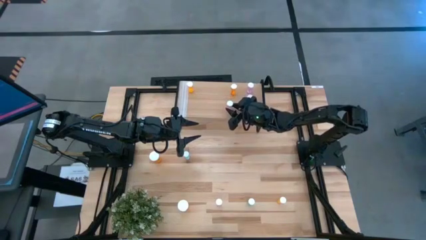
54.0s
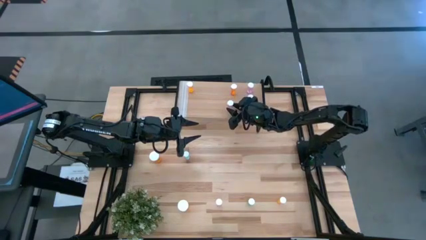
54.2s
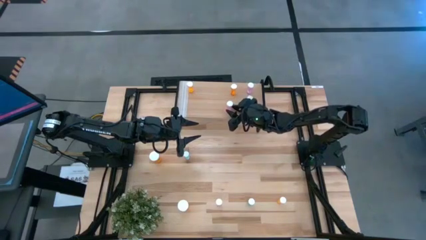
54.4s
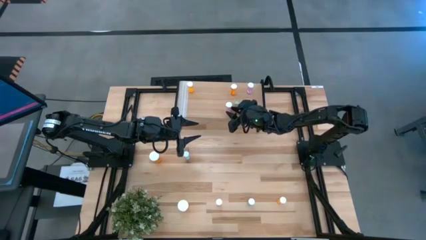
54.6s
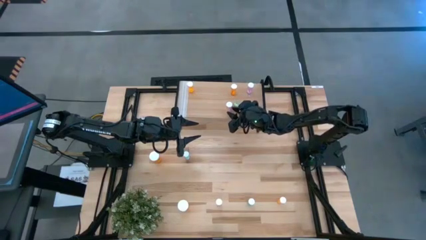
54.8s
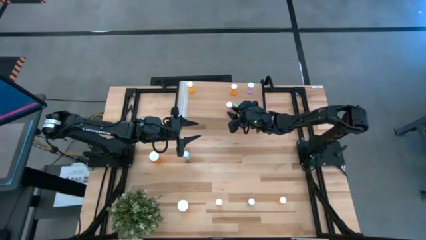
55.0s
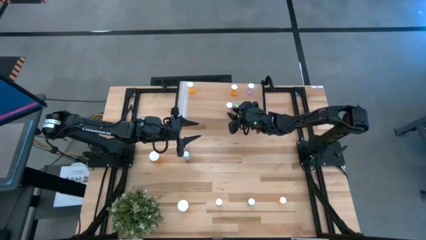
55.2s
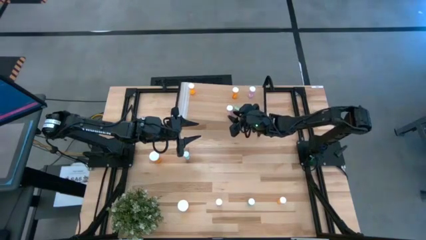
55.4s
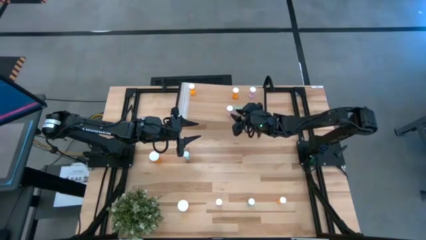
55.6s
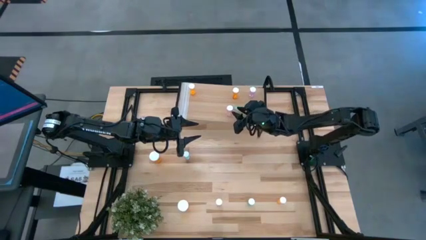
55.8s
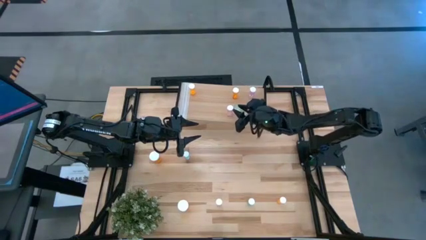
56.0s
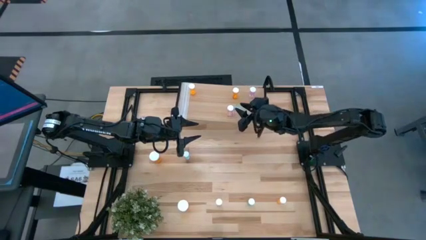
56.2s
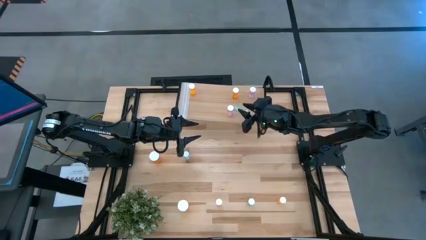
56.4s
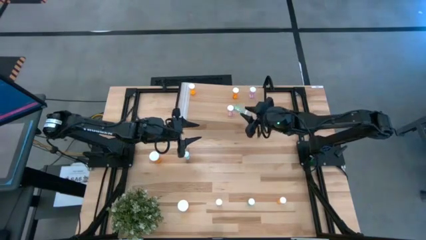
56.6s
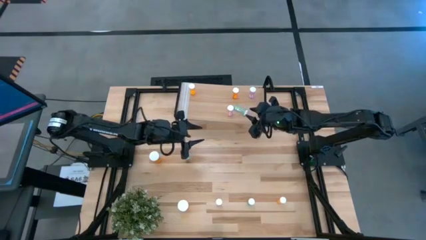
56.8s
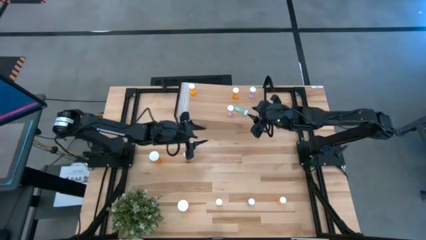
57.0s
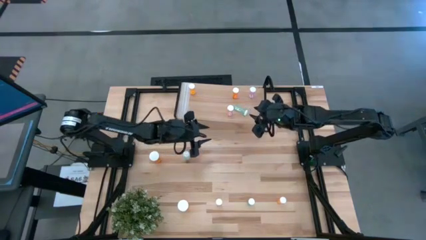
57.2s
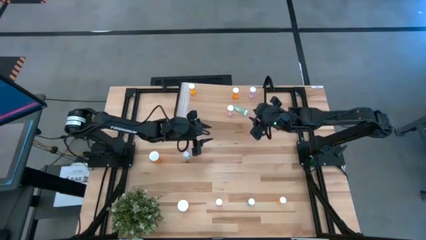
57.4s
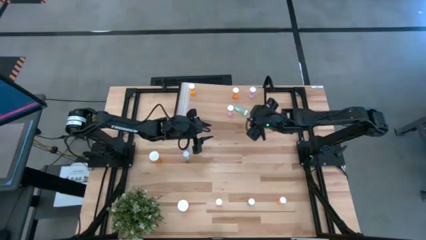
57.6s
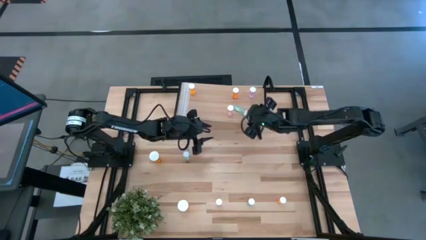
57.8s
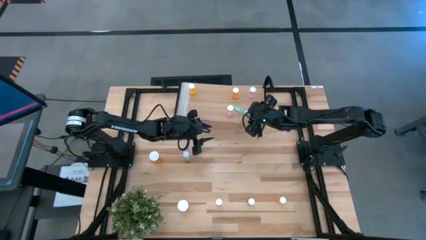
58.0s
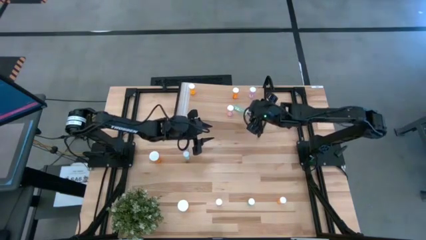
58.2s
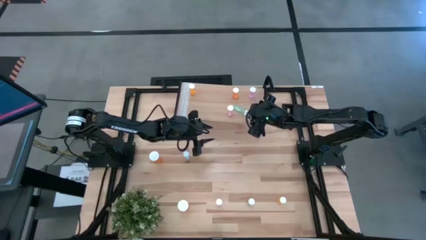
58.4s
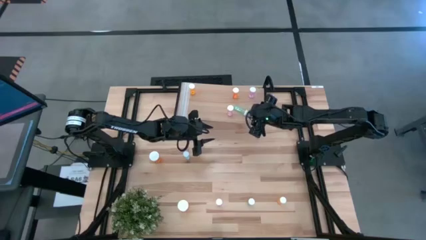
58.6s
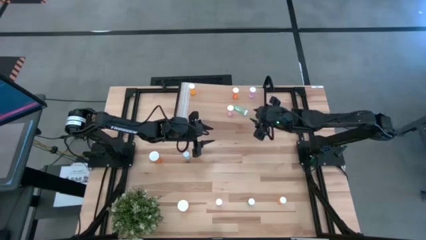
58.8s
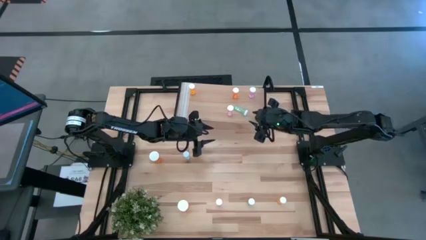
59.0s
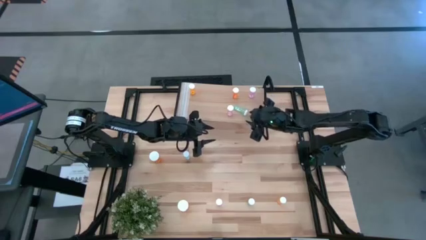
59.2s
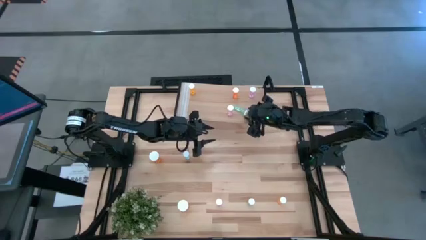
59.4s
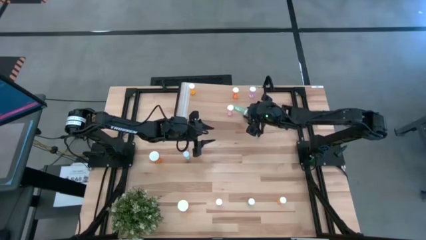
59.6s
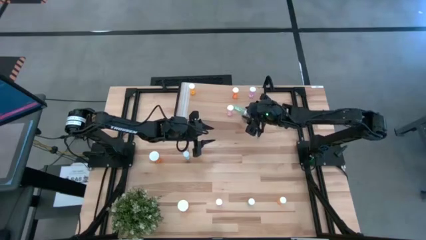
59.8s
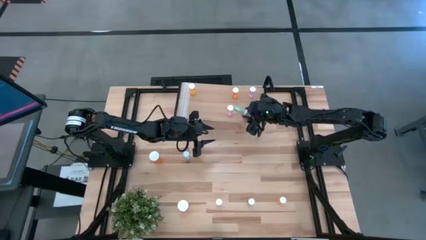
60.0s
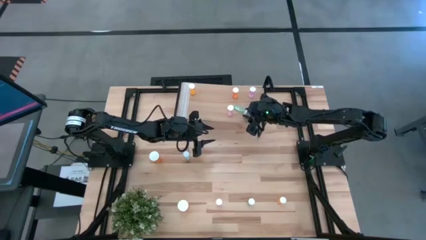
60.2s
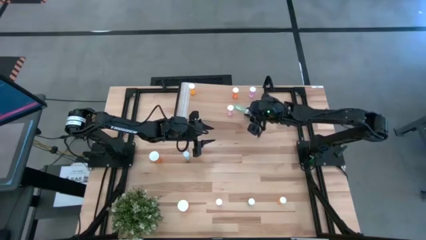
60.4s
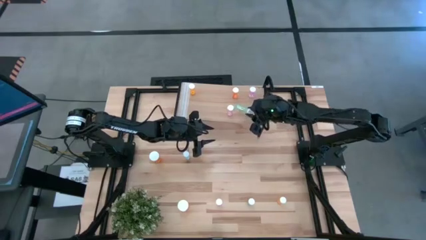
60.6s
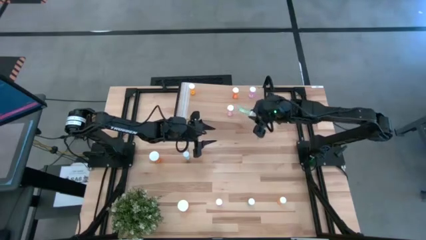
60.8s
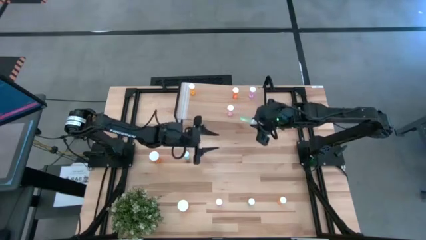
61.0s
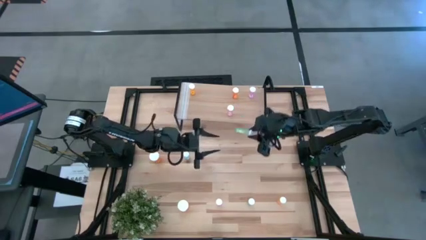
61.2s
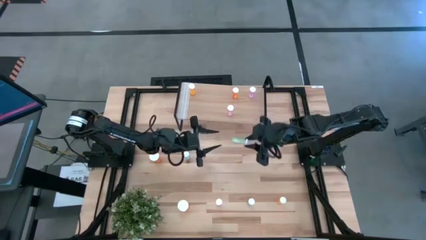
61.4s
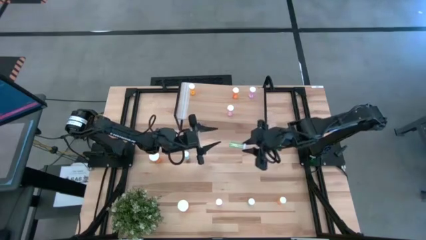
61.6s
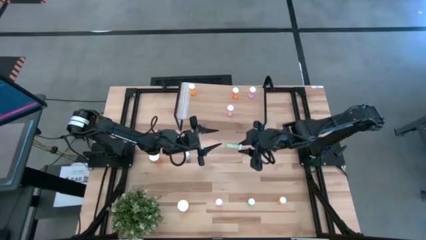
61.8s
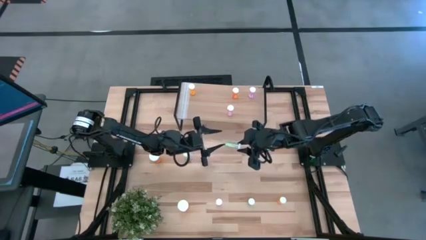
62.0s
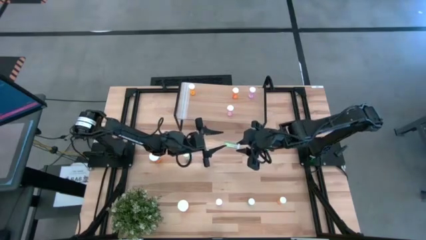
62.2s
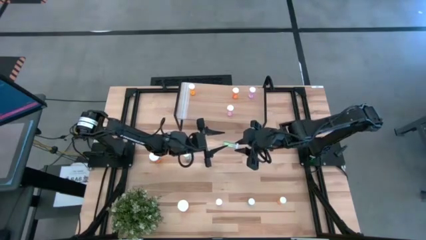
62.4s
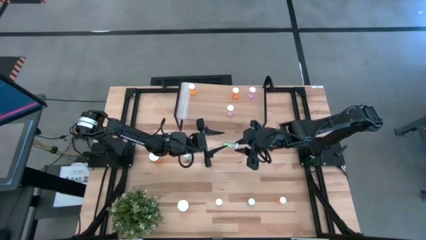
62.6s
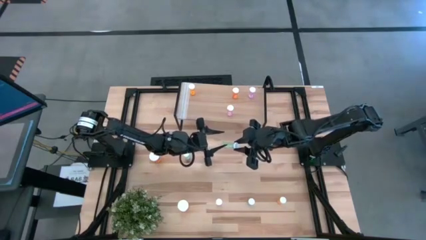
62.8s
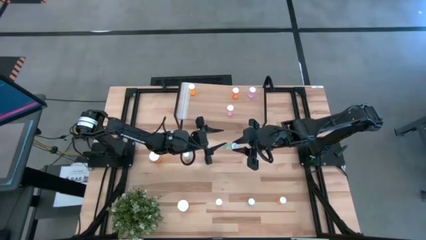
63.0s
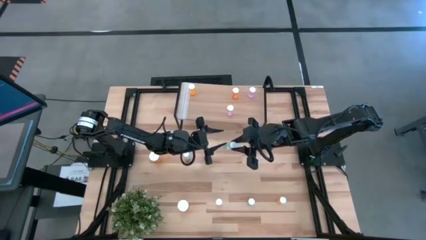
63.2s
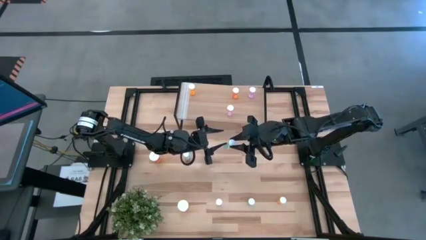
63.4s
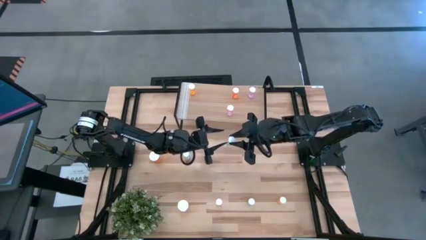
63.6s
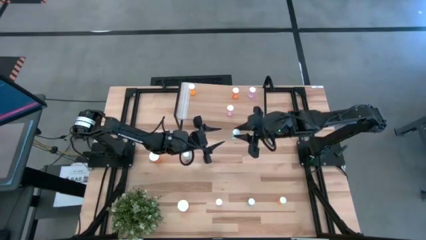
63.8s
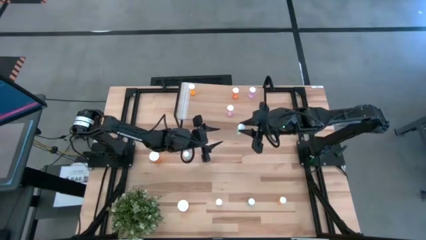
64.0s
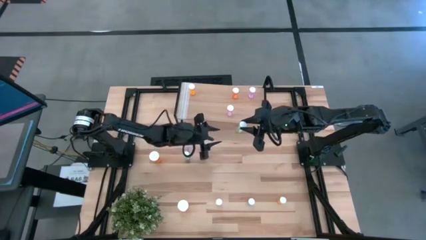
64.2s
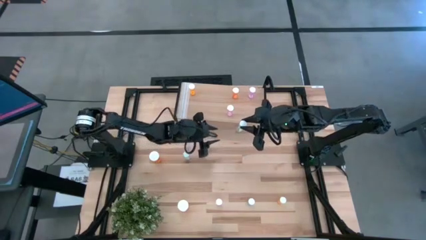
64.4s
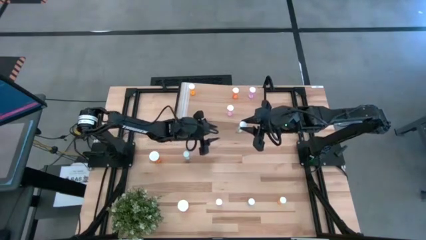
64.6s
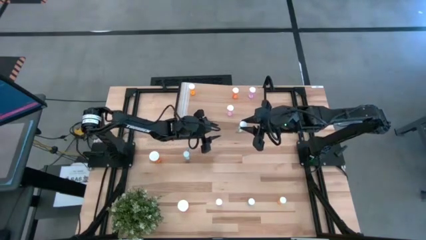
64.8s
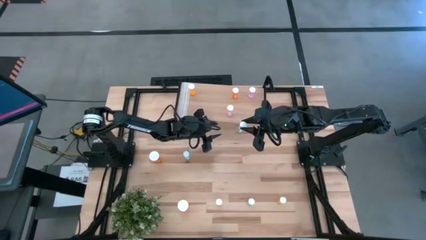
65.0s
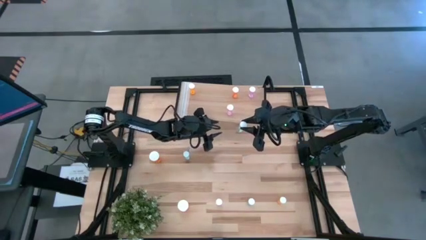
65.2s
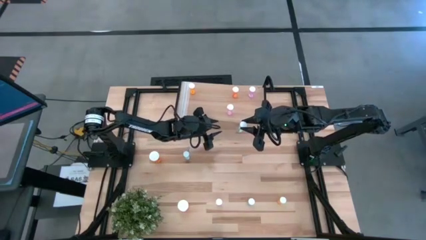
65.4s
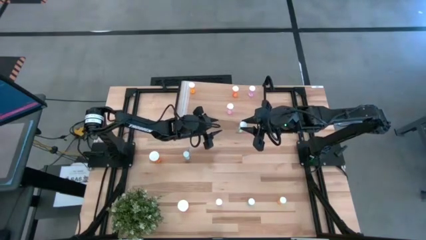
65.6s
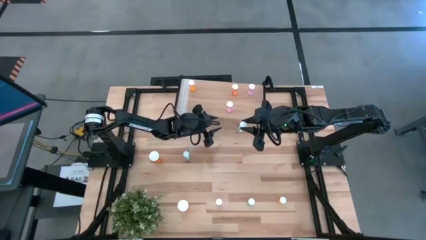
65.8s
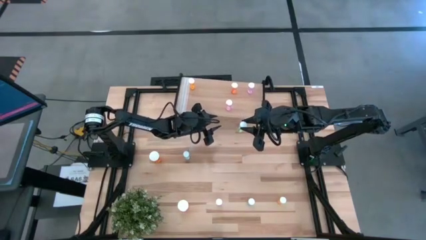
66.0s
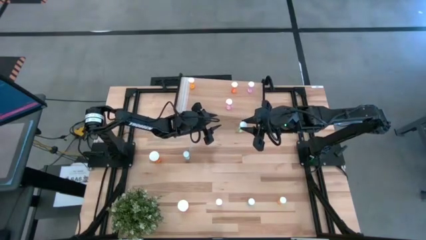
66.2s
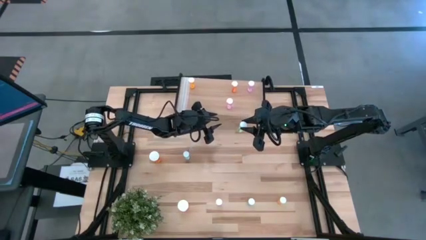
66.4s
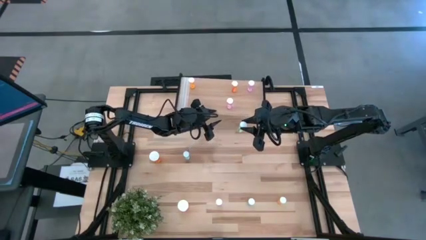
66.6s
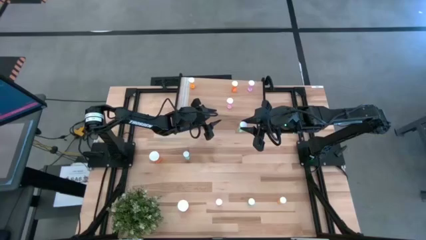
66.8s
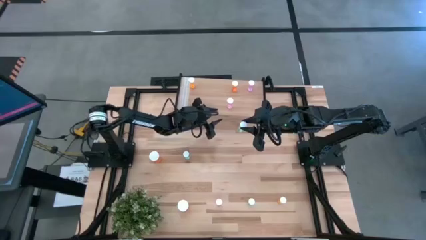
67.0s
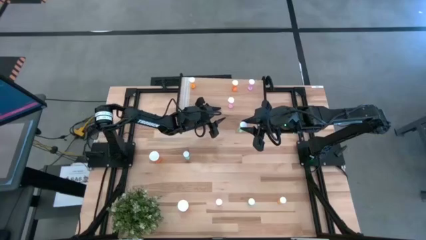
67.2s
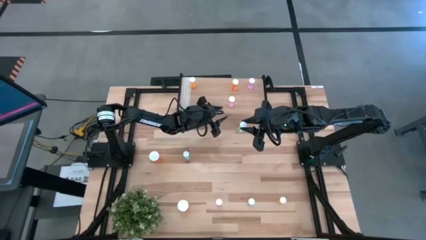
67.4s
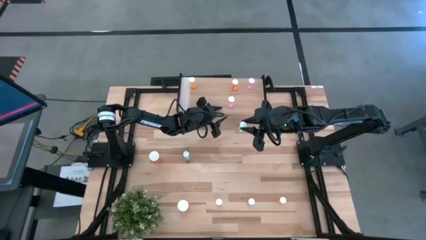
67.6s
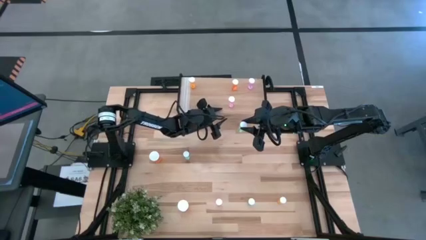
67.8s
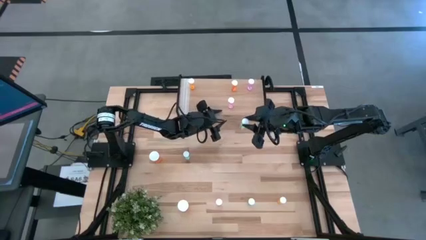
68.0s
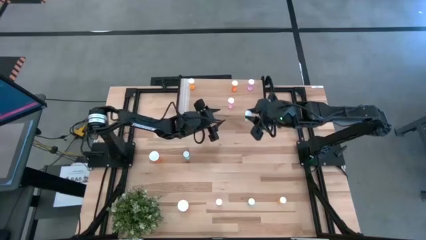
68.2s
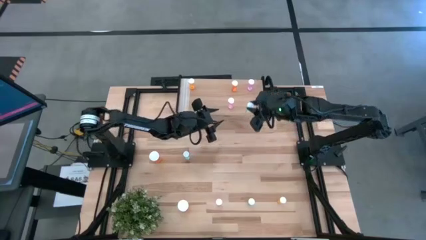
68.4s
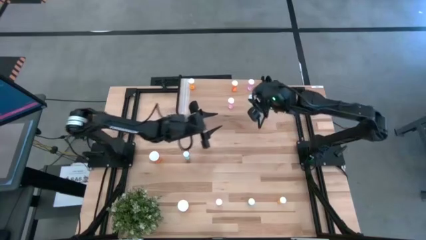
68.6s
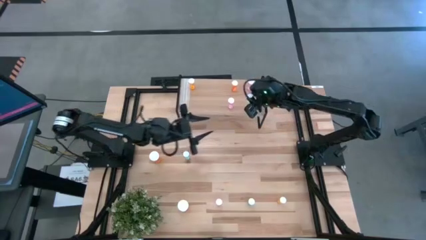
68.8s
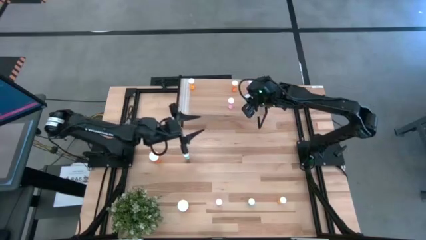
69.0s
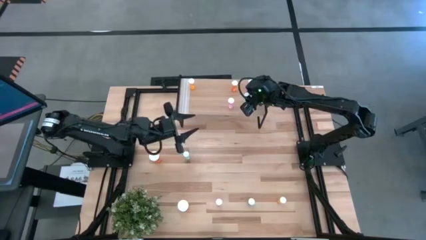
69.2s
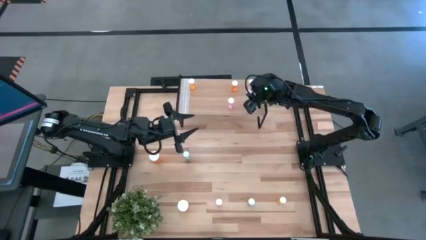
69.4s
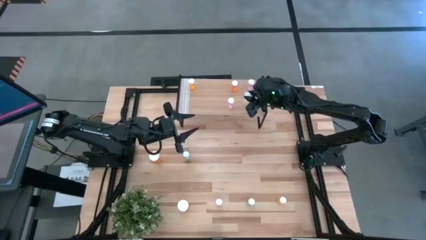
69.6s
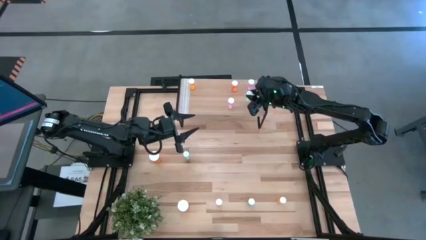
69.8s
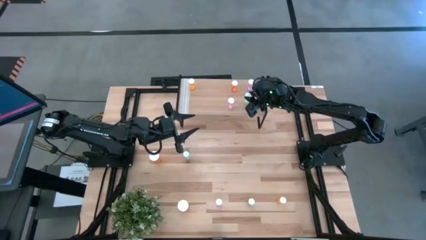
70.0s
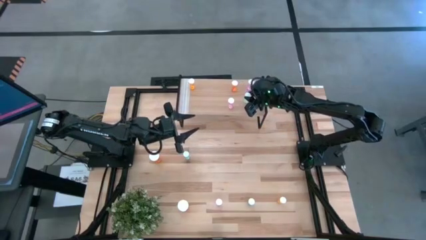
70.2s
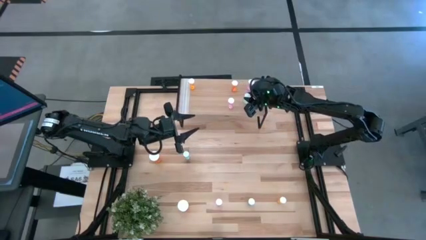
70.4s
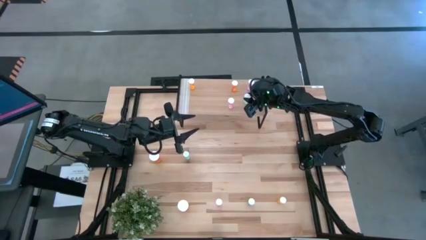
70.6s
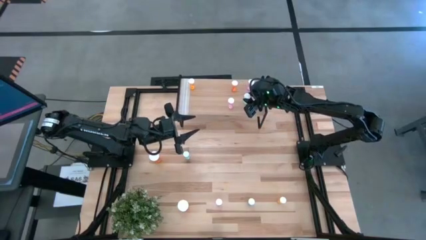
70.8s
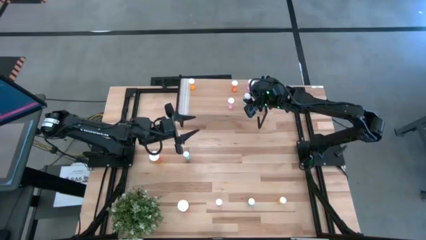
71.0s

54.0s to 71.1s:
Task: Pick and place medicine bottles onto shelf by color
Adjust the blue small pill bottle on the shelf
